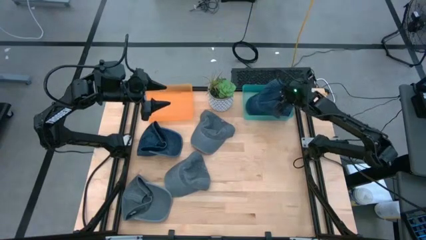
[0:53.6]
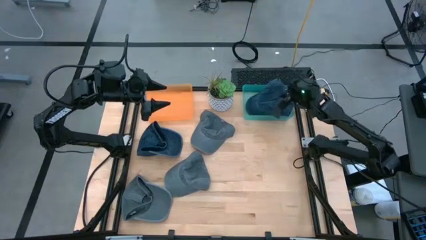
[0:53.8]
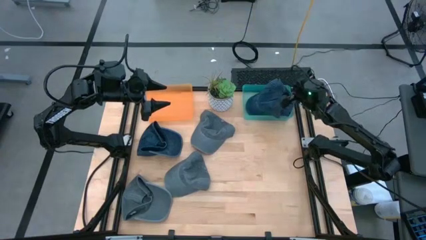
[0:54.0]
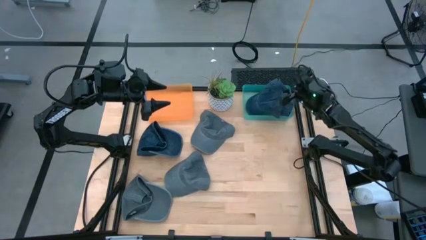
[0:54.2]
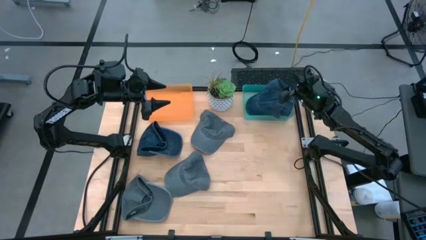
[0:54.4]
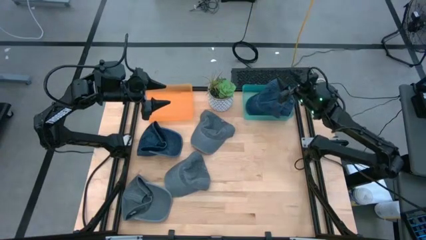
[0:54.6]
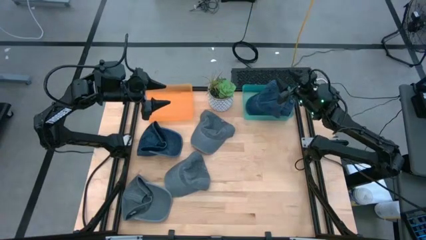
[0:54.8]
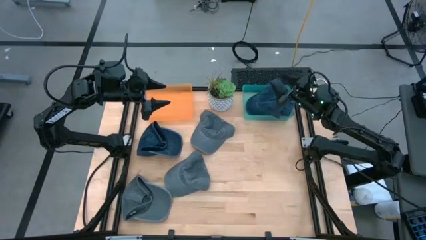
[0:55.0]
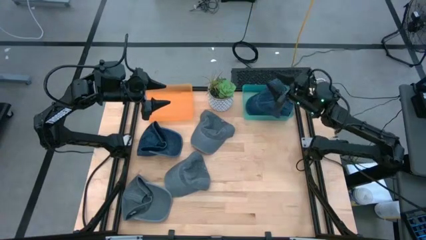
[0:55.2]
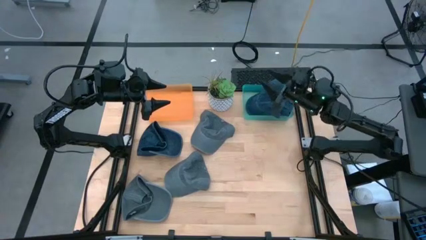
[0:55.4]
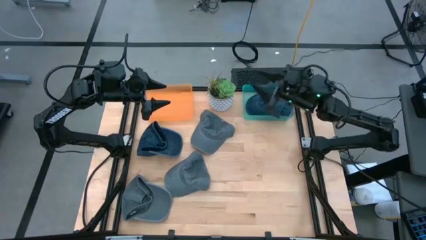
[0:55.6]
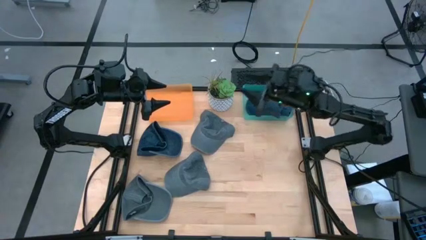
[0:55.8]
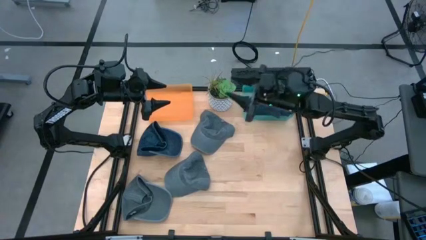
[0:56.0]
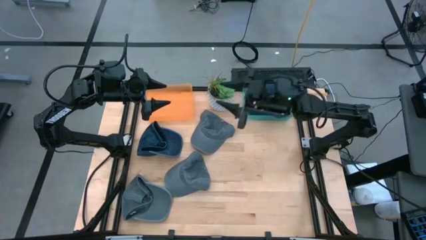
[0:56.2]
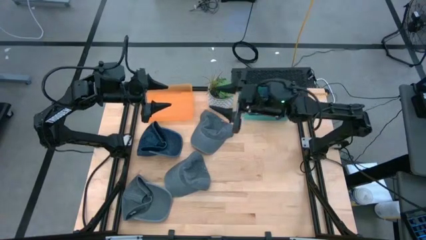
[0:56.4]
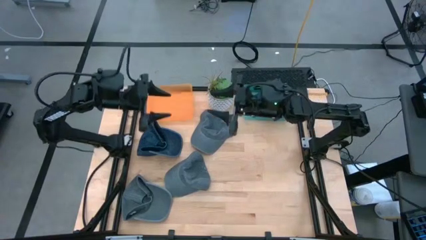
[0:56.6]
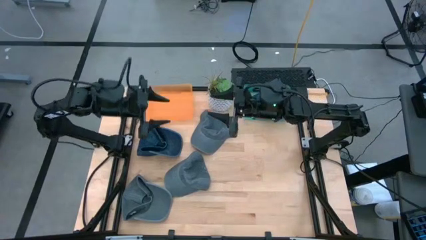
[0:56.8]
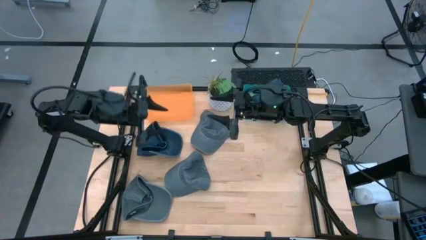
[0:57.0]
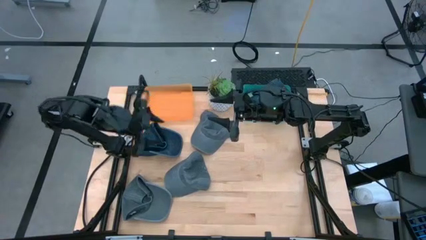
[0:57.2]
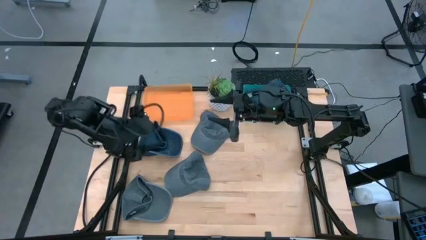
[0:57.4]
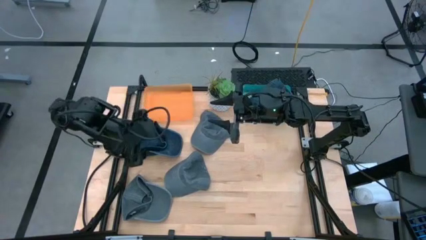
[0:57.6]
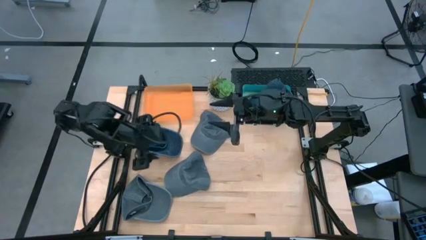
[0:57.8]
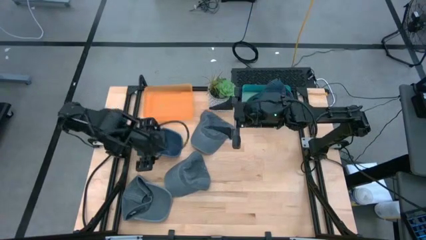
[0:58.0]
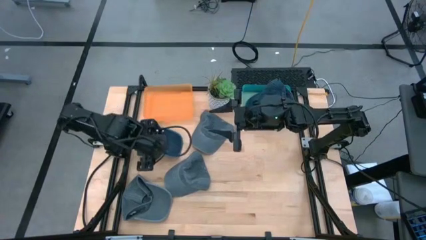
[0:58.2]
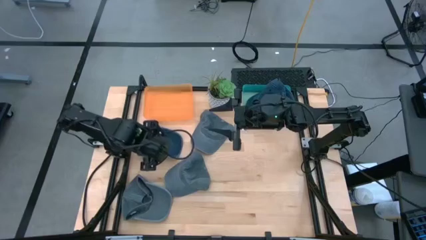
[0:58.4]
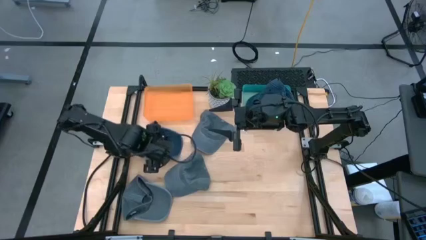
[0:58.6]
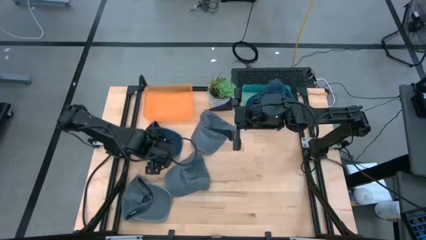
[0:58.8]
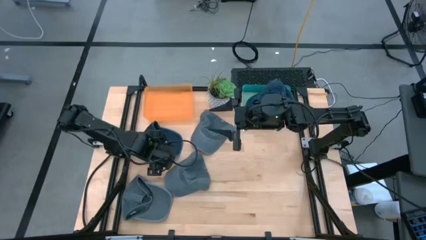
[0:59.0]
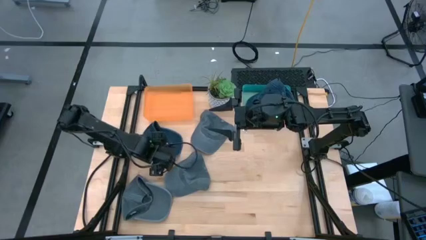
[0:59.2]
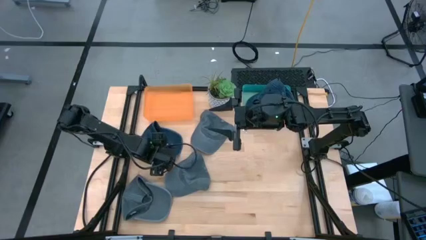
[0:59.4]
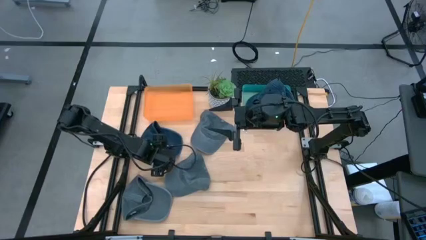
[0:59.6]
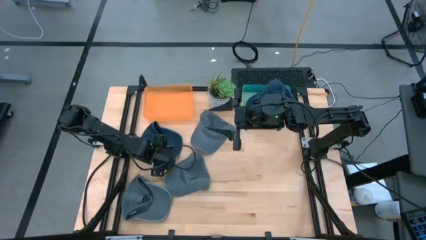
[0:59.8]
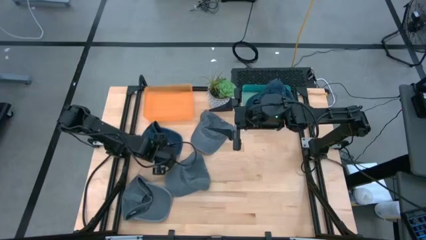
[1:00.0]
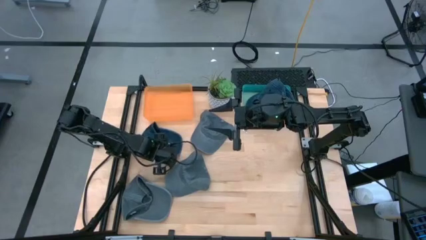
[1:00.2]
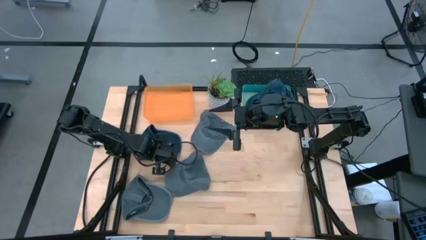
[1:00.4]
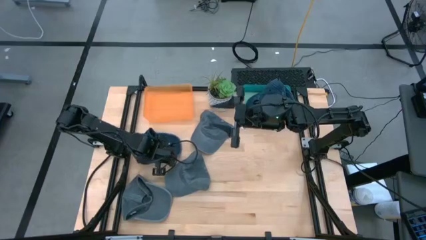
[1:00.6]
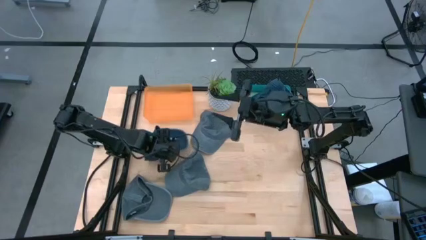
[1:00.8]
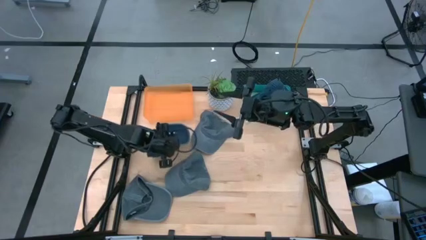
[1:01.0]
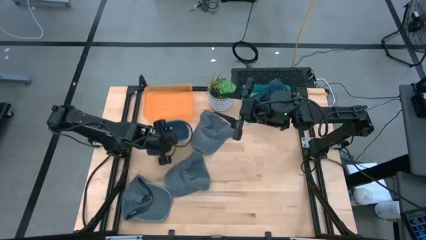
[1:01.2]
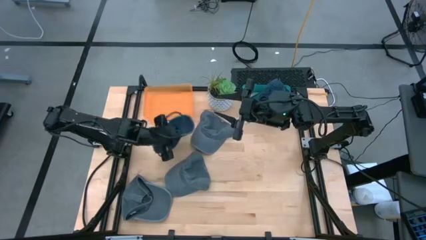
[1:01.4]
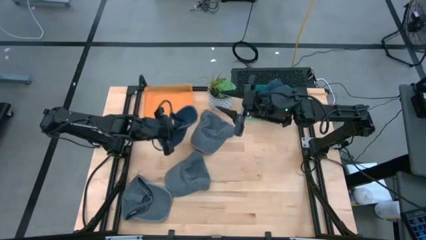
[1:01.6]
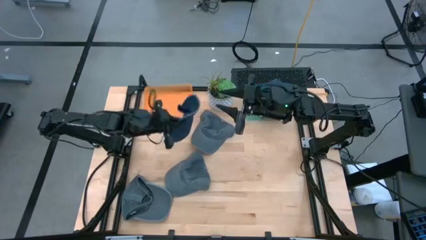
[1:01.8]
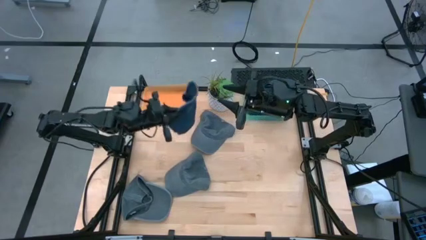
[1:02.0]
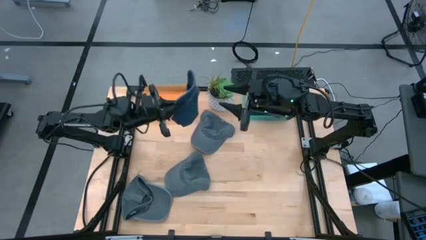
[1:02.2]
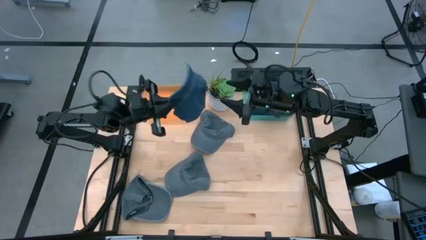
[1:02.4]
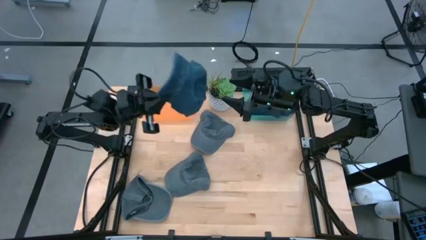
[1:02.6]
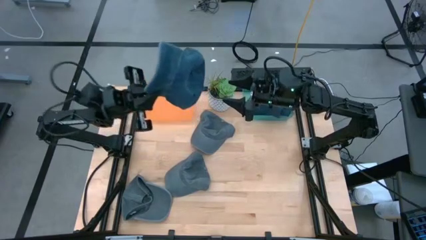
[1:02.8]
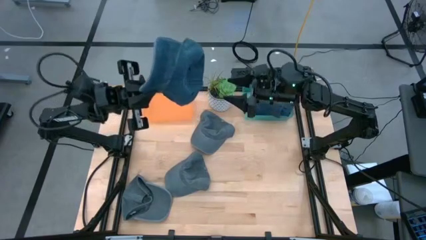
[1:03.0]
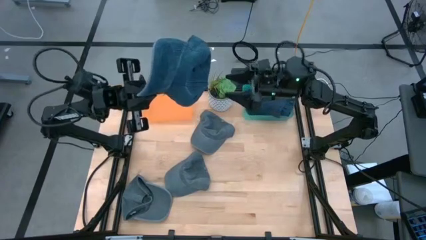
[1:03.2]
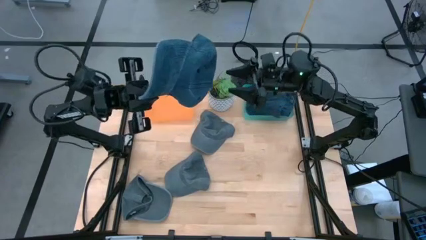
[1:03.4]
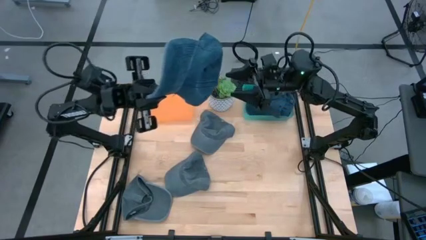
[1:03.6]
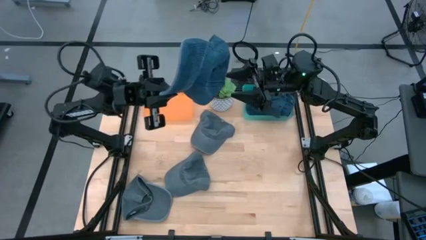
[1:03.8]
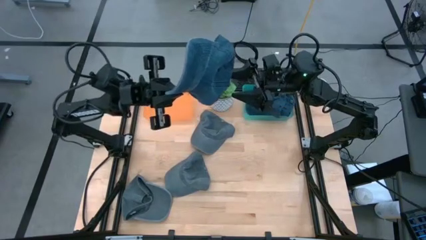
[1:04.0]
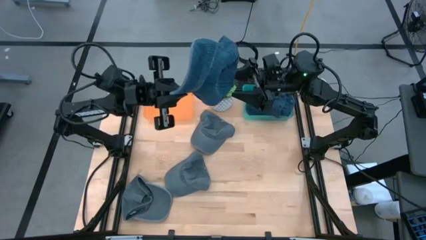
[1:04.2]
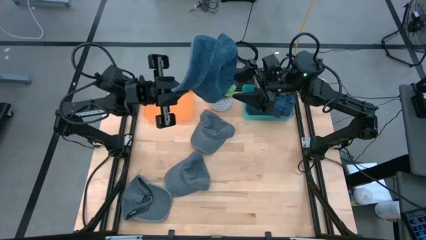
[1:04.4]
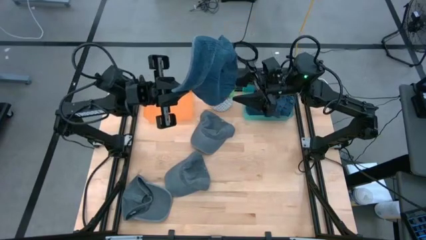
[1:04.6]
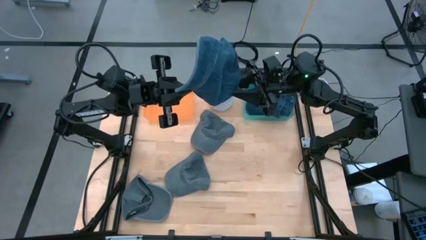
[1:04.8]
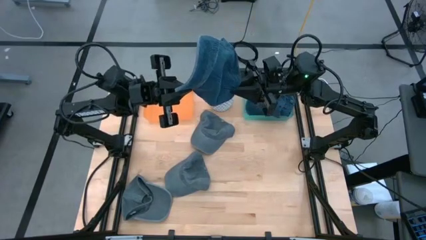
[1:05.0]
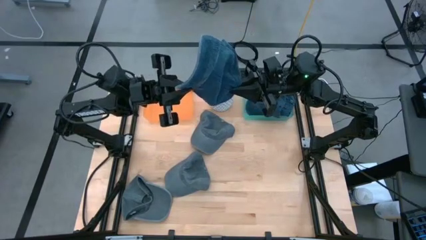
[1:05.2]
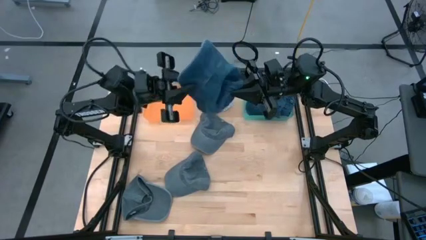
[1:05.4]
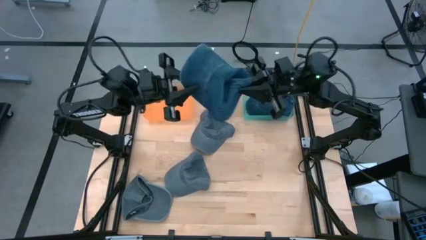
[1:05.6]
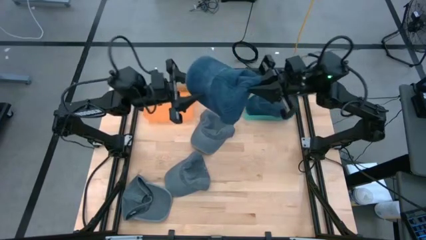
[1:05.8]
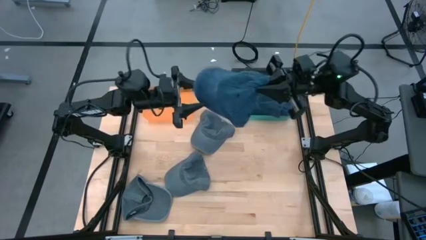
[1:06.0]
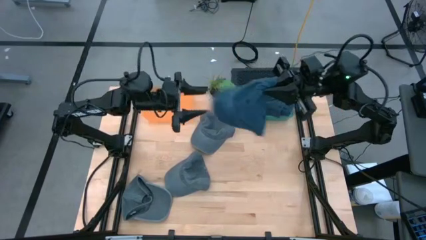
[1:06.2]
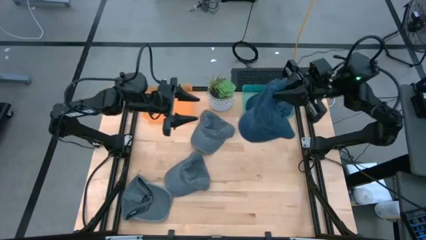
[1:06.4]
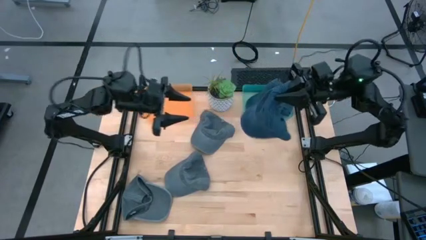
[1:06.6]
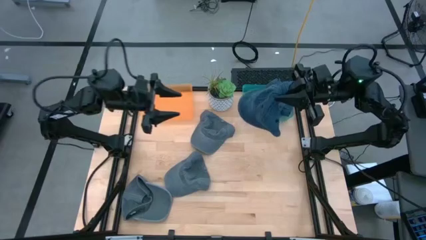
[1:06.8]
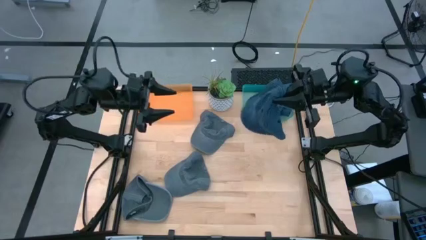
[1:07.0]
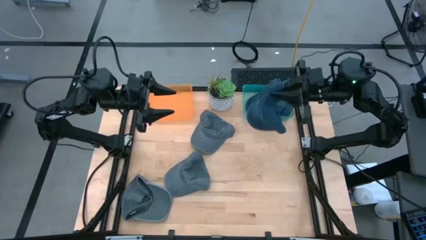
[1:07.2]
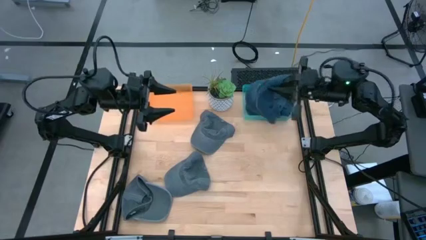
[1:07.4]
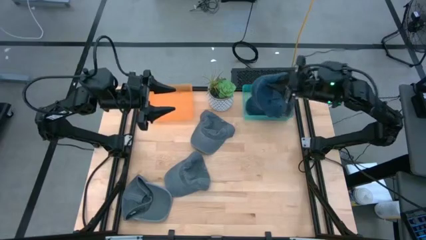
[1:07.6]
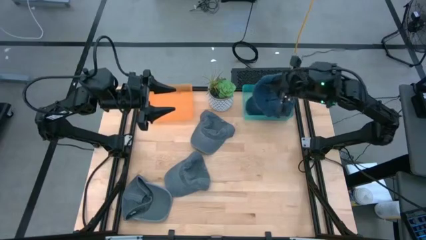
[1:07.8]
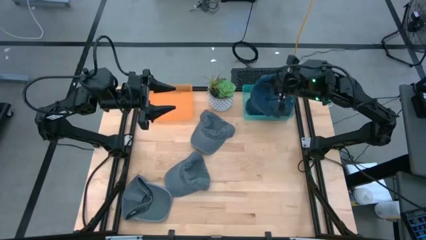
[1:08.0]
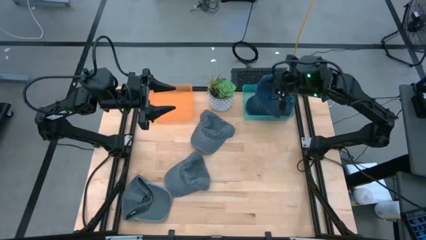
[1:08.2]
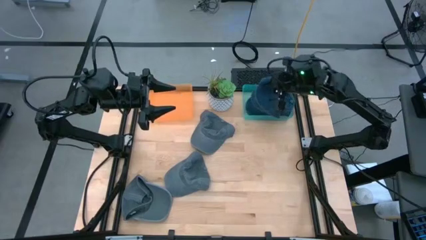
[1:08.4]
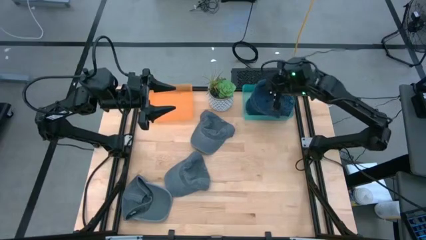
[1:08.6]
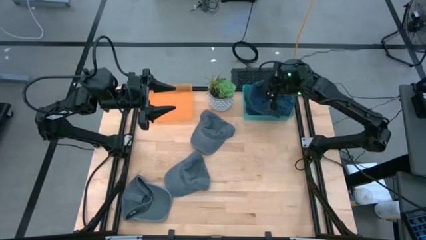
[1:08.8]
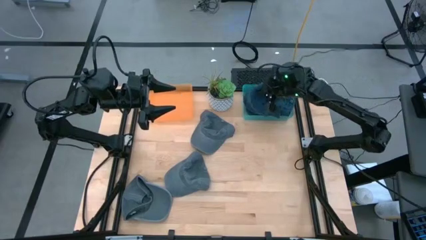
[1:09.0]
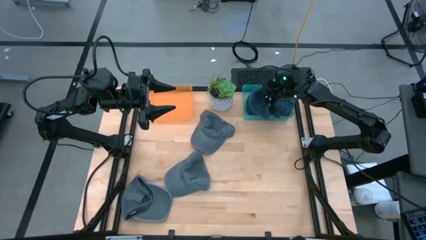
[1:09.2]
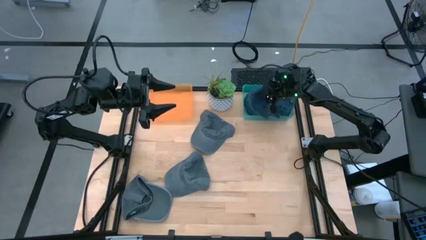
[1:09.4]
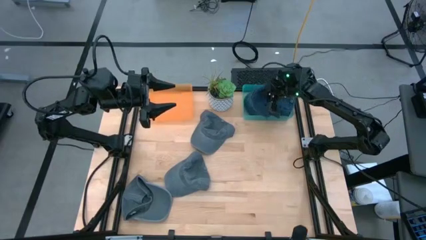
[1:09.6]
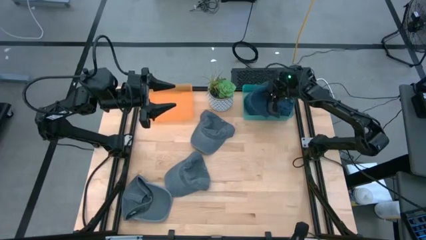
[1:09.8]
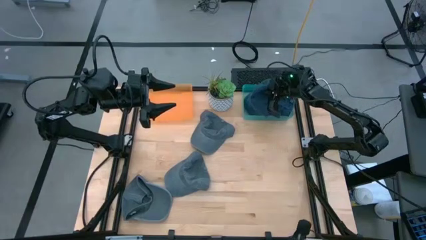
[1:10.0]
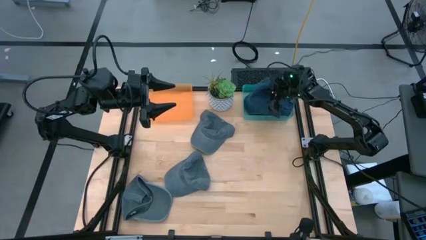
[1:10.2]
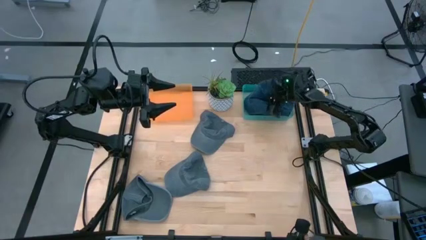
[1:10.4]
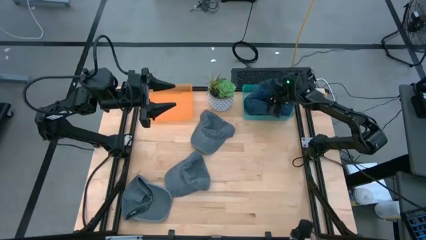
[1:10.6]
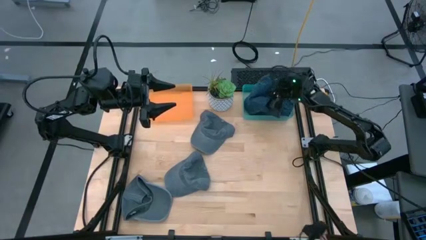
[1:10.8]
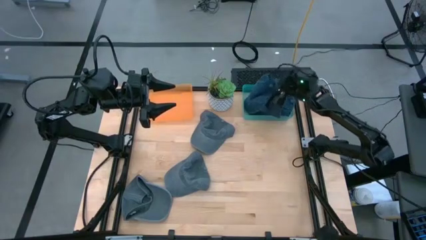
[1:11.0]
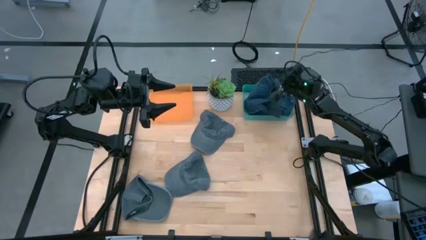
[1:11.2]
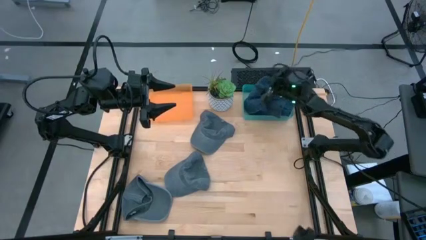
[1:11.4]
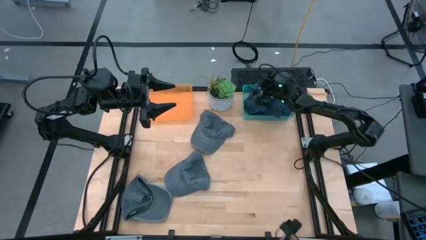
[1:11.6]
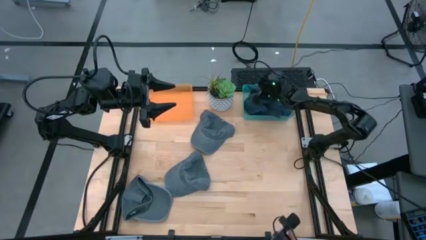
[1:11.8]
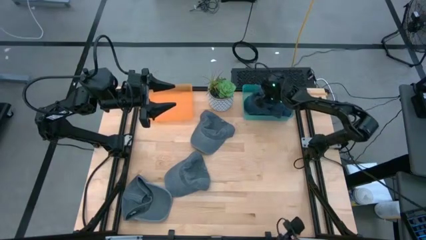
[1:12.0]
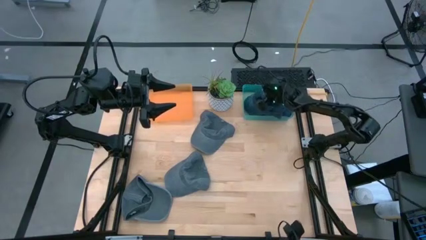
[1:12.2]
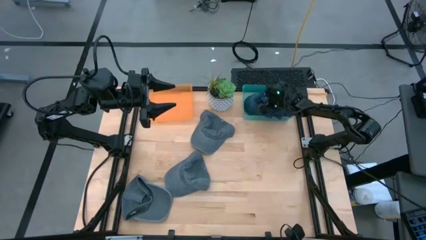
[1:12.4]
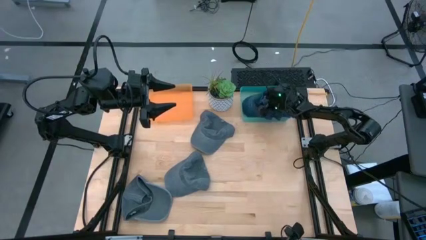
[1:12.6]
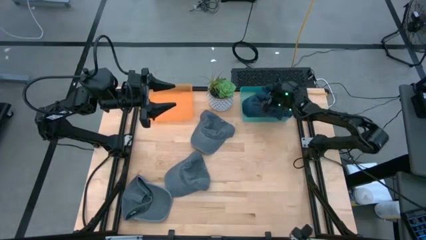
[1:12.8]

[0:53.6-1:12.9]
Task: Pick & Place hat
Put the blue cap into the light blue bin
